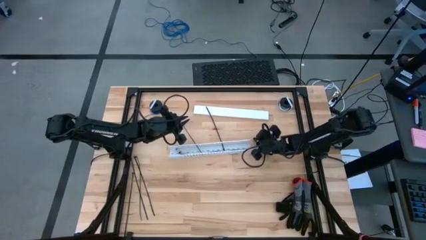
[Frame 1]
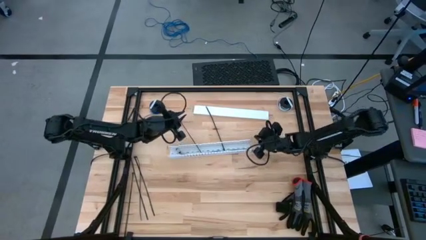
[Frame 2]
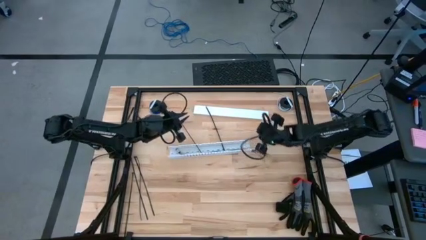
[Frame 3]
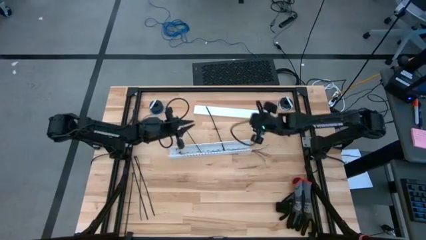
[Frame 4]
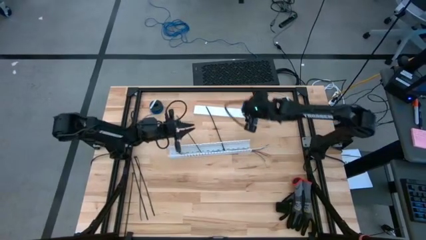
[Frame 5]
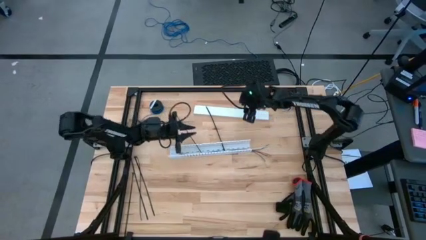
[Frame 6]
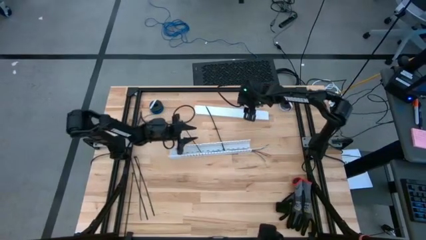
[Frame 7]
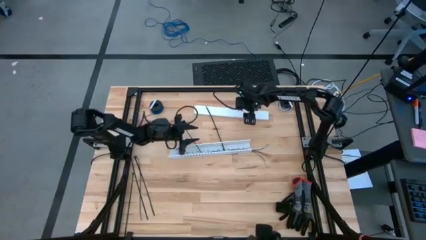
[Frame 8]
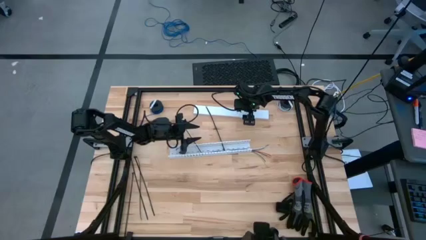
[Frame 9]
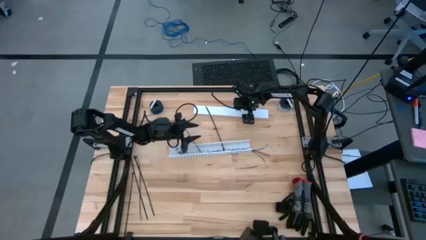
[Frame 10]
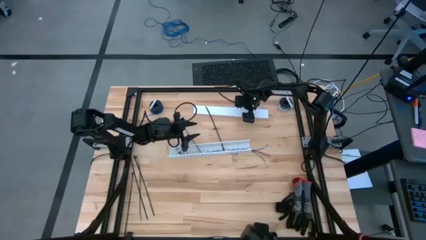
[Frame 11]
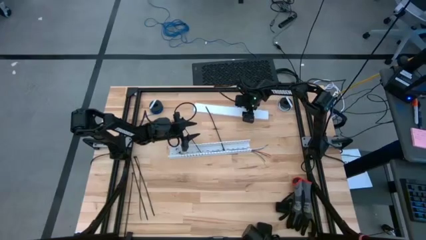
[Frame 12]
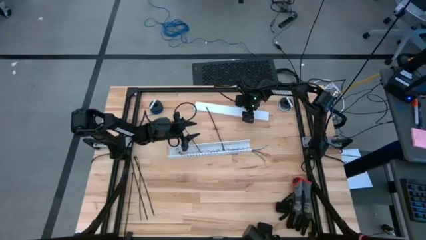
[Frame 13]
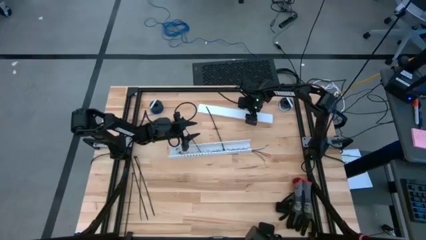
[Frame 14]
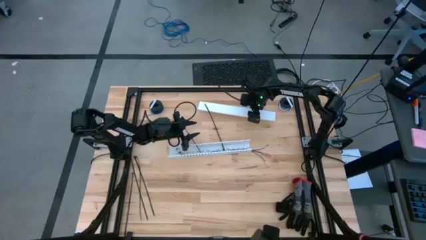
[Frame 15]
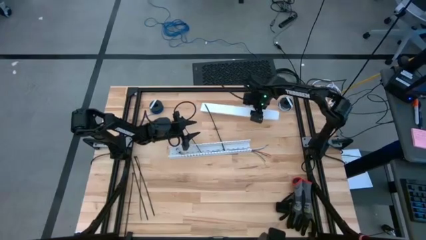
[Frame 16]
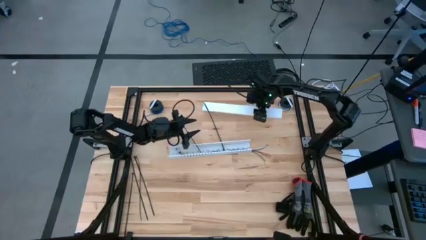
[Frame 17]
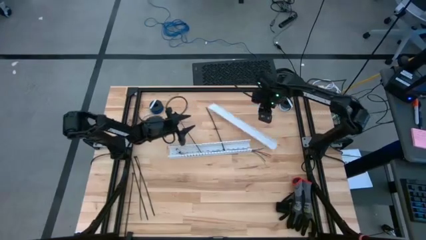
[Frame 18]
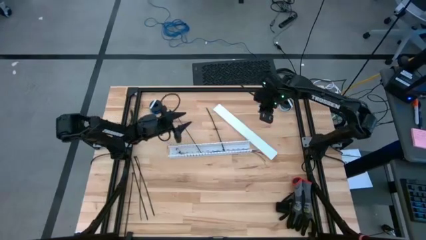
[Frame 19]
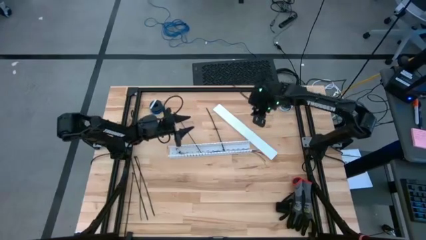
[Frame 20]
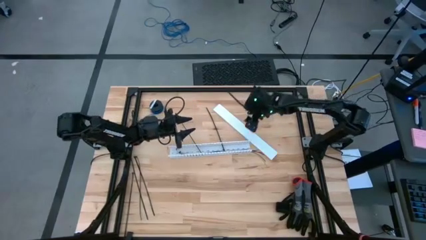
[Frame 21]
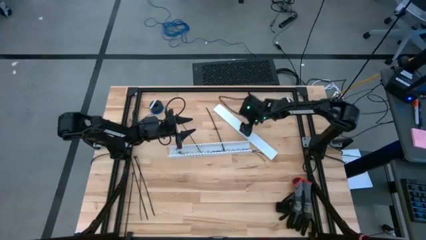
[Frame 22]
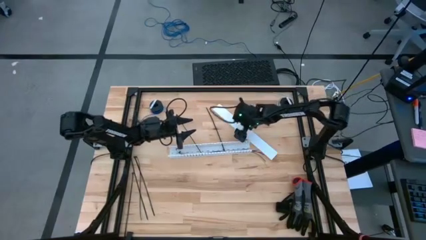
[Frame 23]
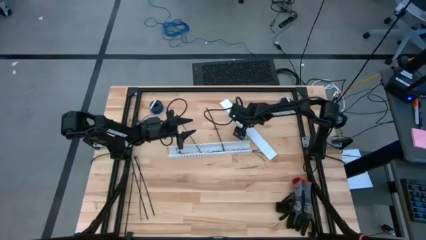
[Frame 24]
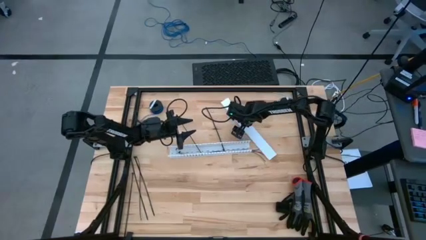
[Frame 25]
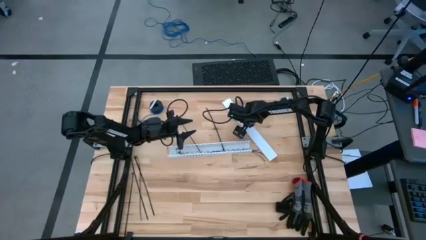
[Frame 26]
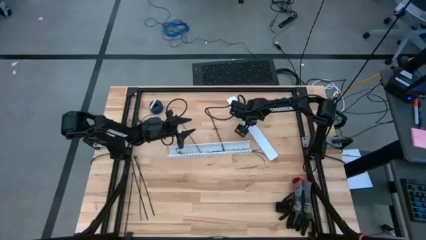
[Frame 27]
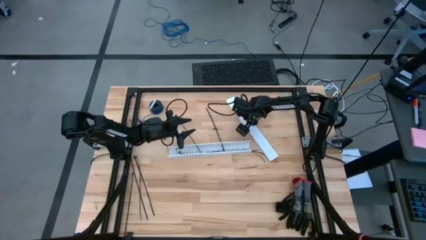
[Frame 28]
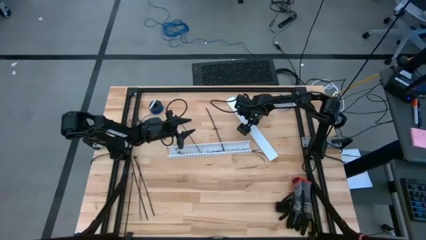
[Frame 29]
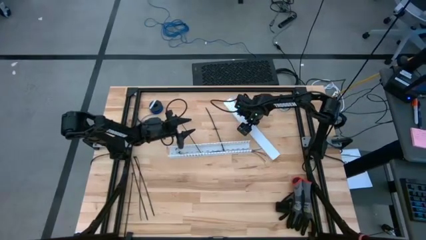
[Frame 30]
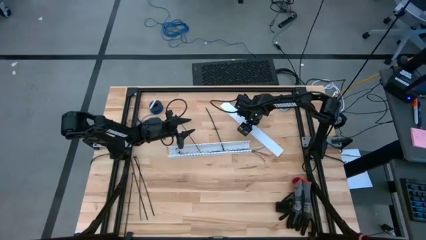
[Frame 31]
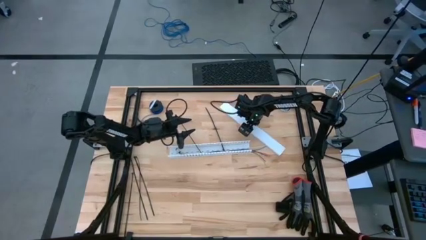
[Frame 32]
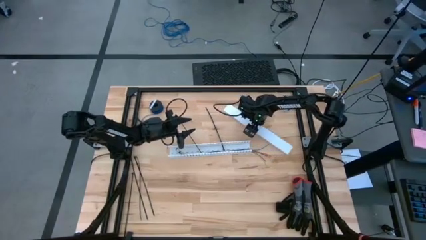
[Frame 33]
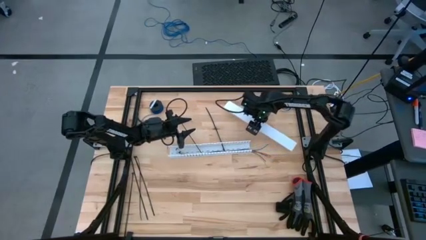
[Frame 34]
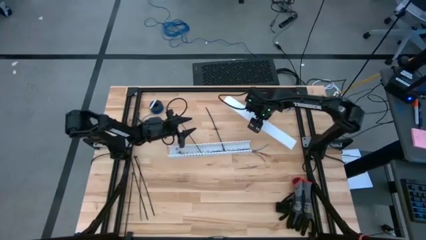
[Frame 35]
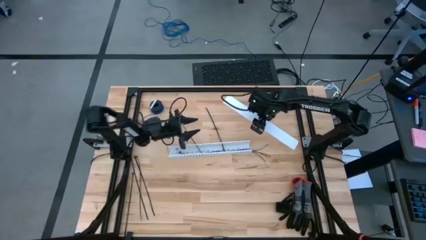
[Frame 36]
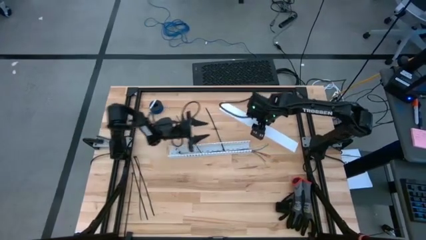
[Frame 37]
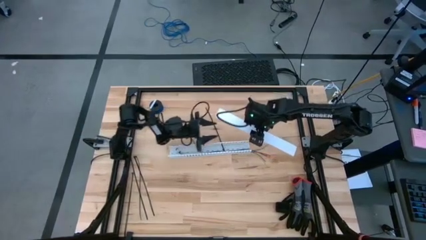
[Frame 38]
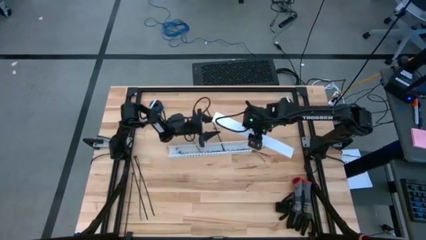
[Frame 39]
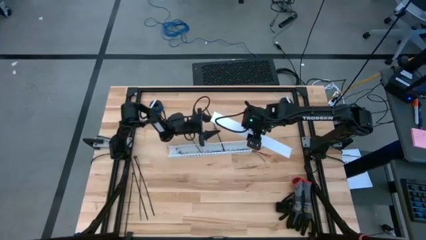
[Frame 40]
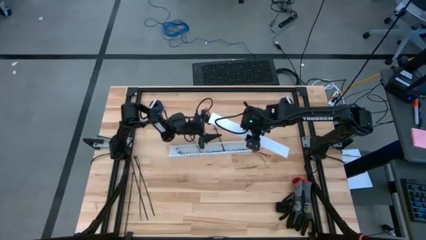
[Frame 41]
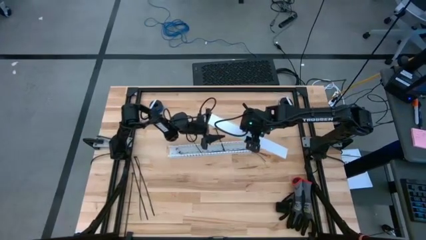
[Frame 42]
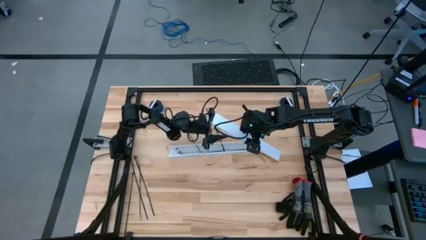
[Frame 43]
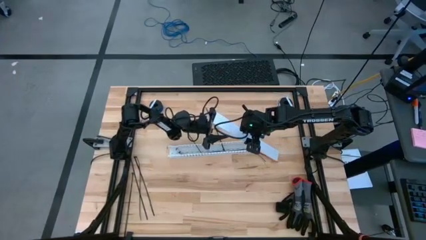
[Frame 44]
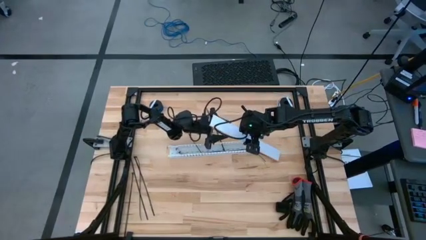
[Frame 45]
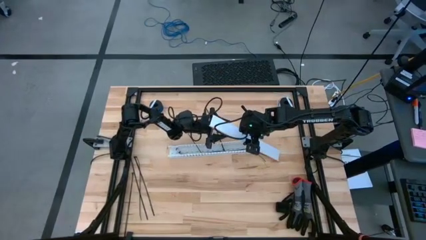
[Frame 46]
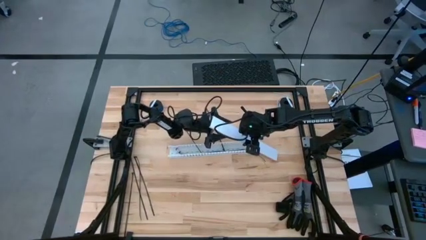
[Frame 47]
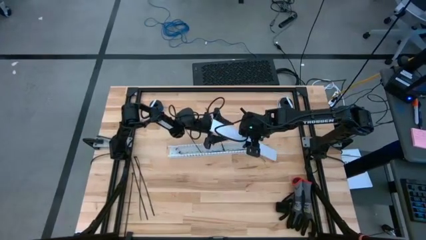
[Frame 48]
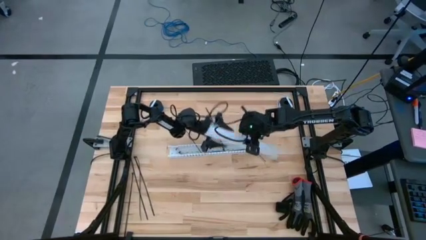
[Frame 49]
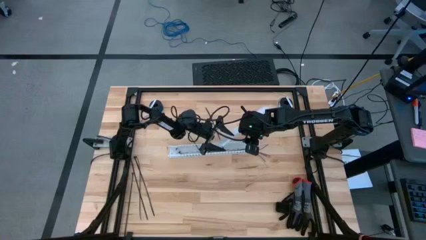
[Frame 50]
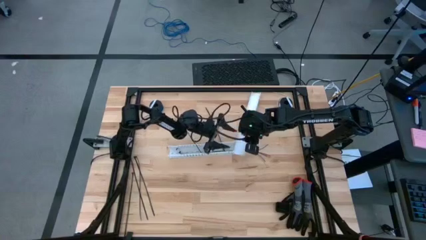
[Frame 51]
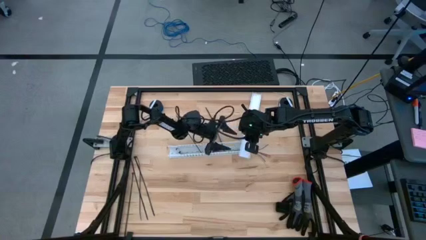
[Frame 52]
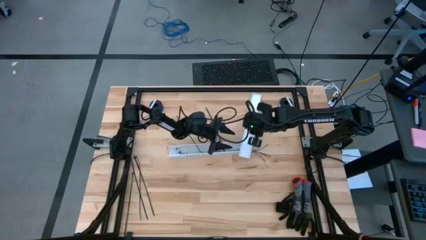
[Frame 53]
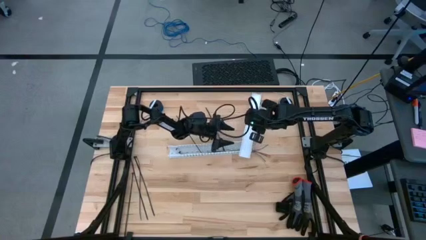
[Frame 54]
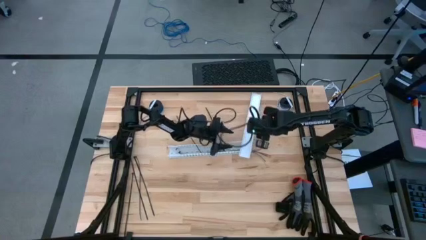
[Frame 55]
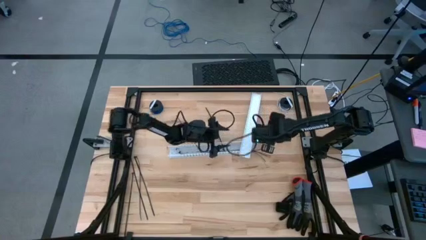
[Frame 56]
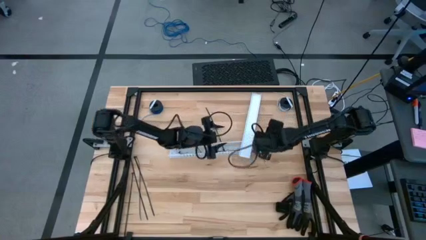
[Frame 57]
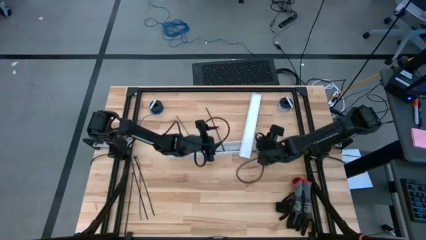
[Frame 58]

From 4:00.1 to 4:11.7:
Task: Ziptie cables
Close the white cable duct

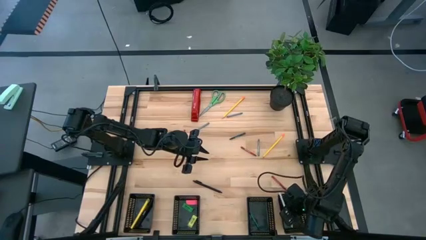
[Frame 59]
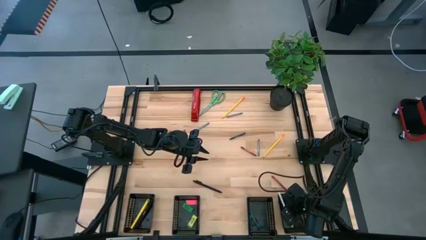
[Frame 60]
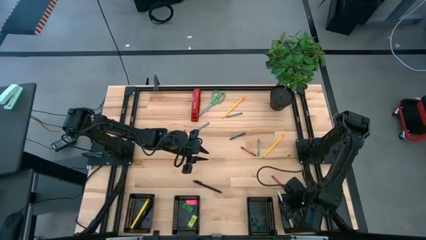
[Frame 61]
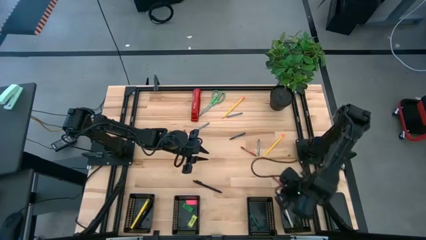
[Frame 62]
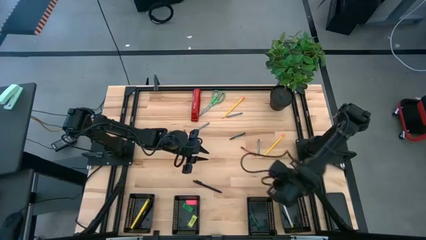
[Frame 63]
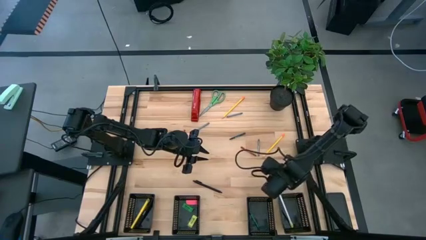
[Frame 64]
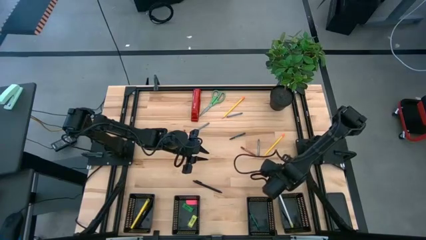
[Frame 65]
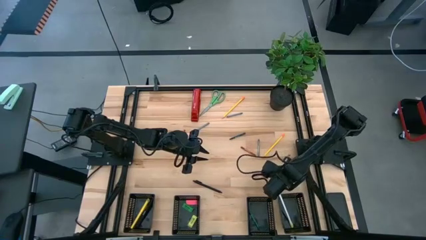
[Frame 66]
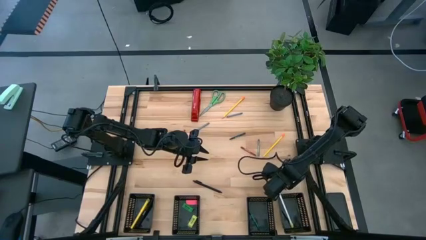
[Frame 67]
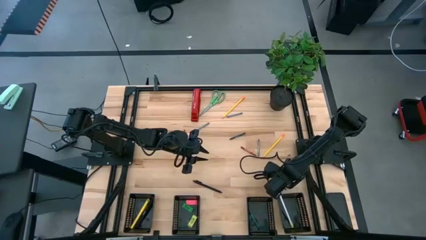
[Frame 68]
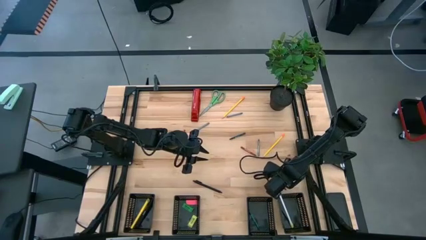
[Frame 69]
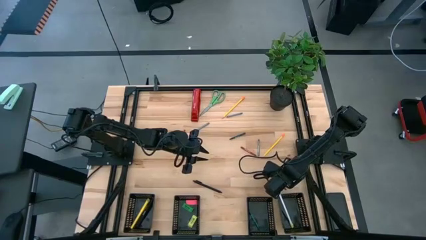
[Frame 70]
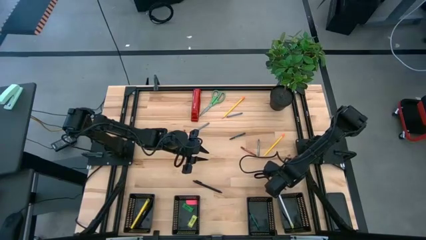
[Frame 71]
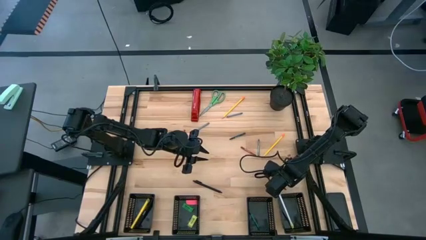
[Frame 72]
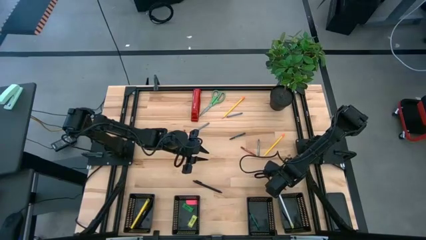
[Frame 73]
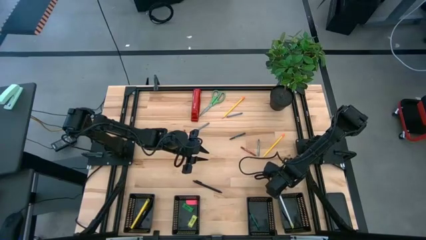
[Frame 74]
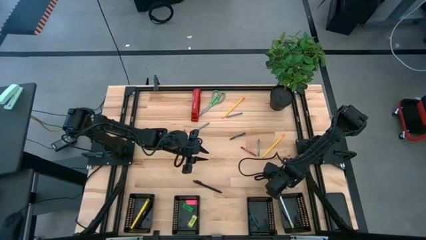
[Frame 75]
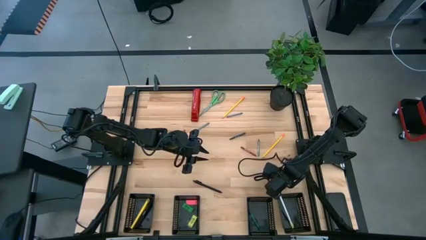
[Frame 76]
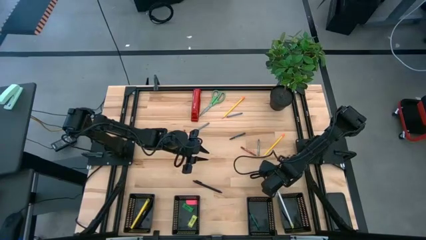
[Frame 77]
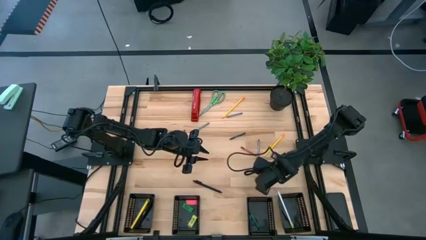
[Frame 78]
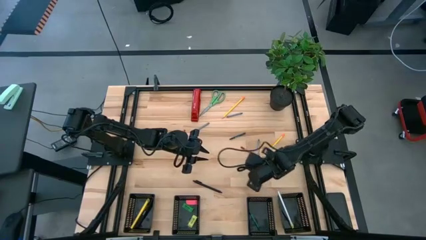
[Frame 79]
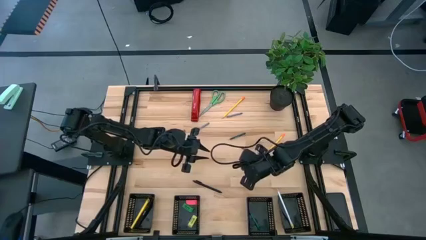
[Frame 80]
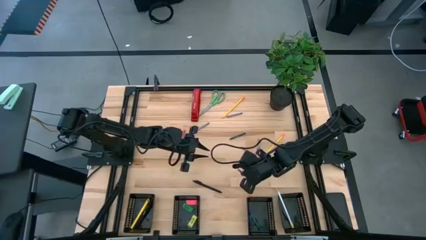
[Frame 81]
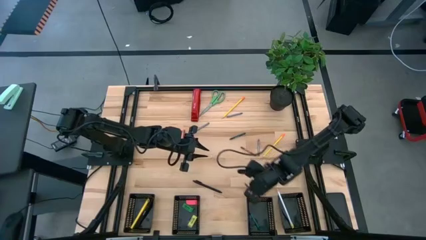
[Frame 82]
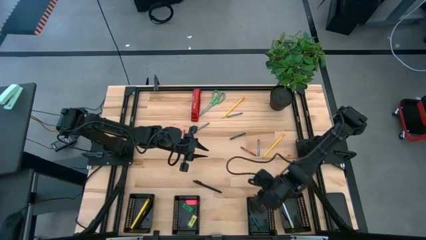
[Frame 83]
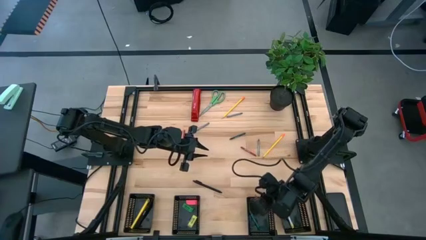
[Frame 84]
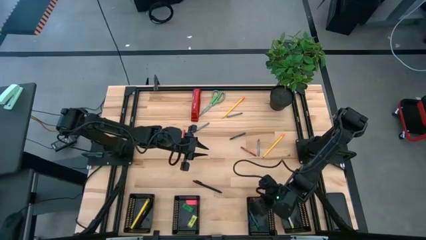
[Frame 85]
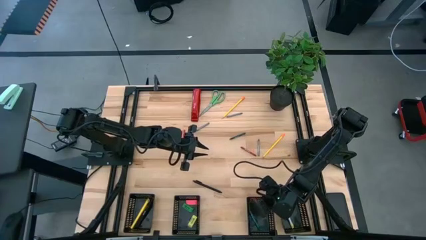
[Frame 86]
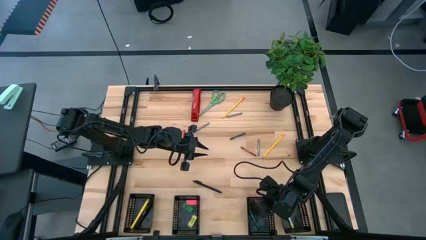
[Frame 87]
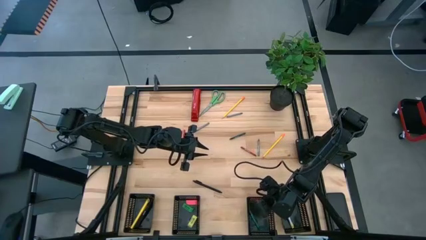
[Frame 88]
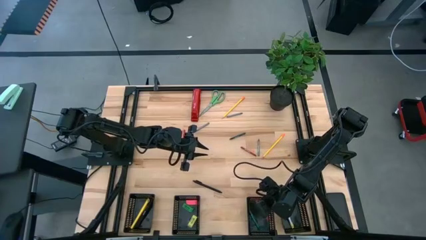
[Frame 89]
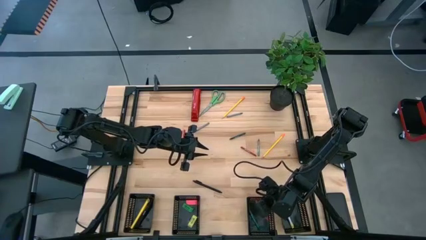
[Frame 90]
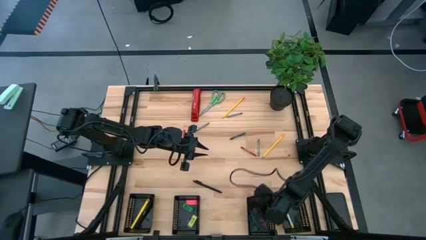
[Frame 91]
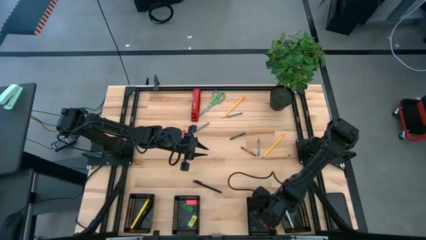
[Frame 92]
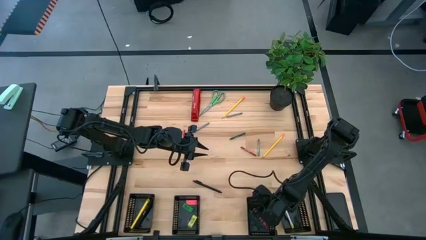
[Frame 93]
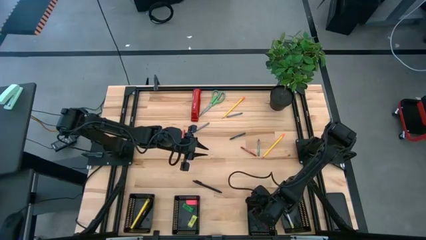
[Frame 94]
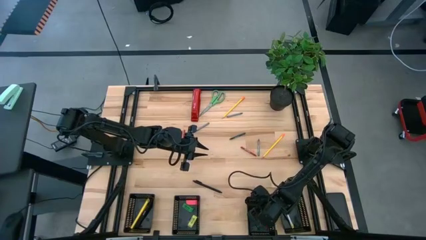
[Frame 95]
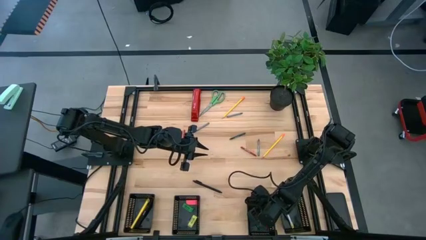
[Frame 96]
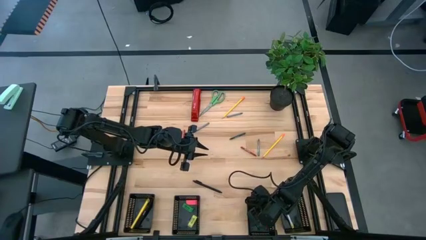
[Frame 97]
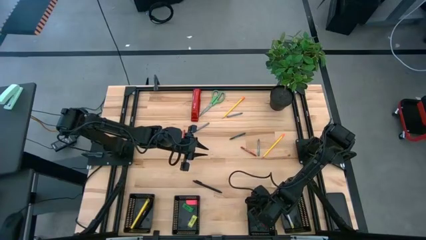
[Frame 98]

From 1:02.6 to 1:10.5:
Task: Sort crayons/erasers/pens/pencils in bins
Put the bottom right red crayon into the middle right black bin
